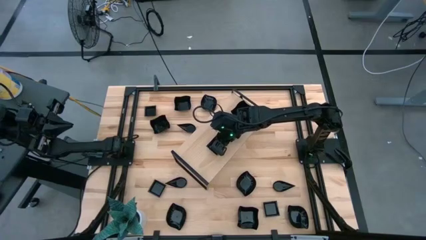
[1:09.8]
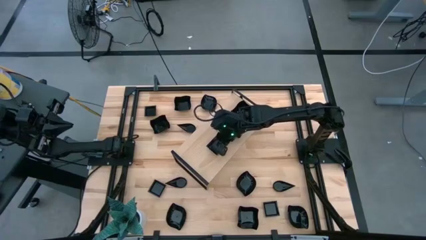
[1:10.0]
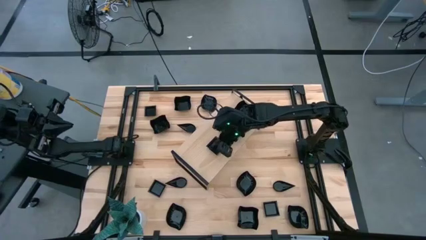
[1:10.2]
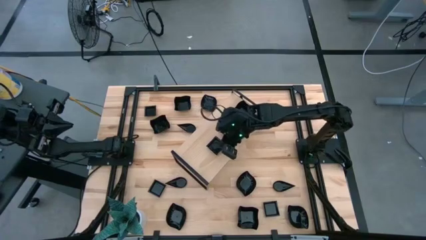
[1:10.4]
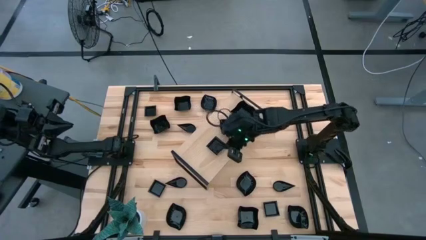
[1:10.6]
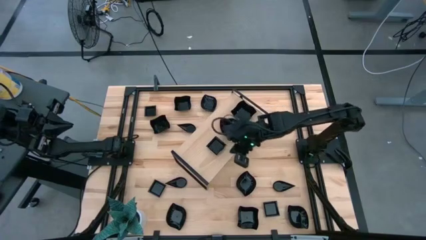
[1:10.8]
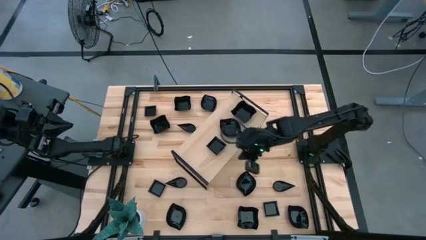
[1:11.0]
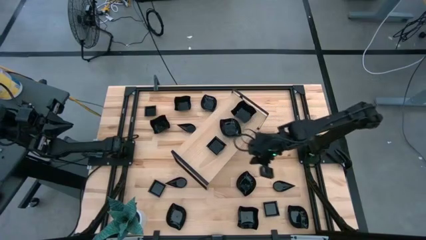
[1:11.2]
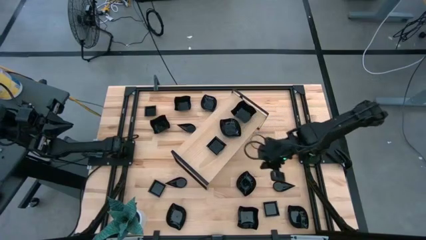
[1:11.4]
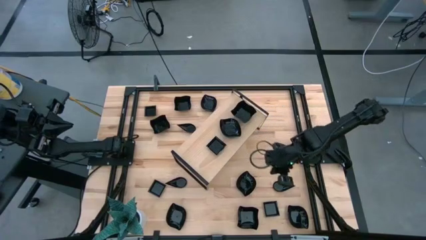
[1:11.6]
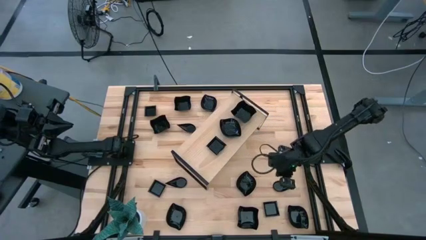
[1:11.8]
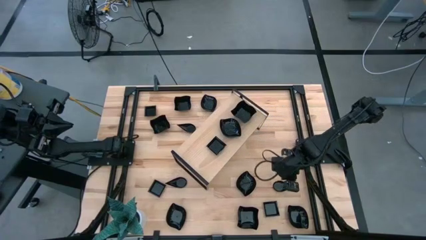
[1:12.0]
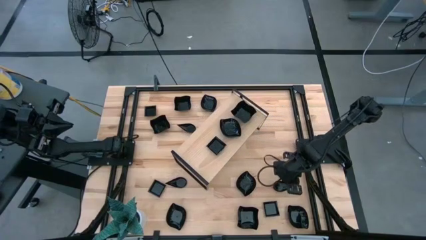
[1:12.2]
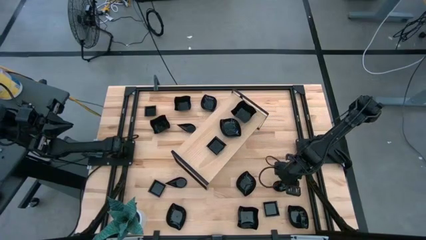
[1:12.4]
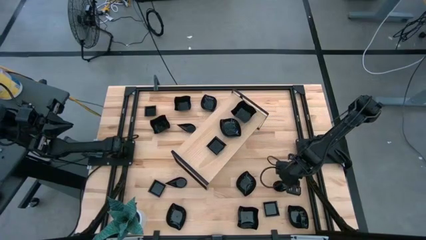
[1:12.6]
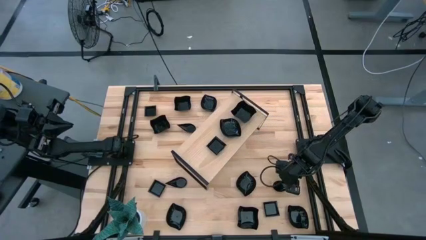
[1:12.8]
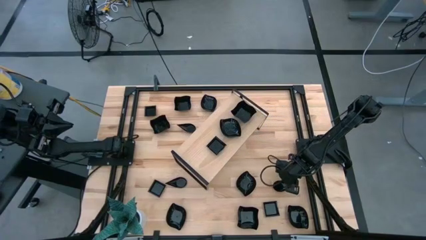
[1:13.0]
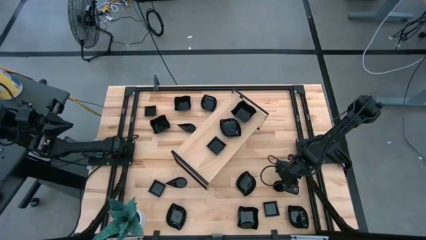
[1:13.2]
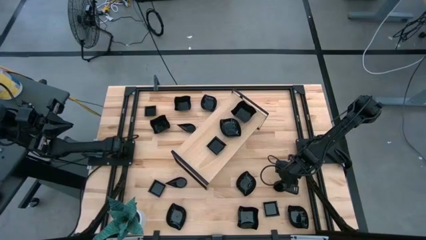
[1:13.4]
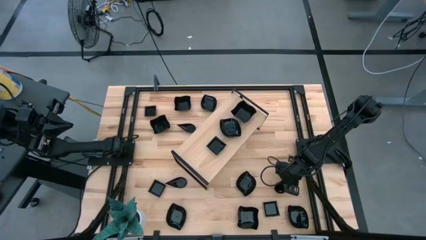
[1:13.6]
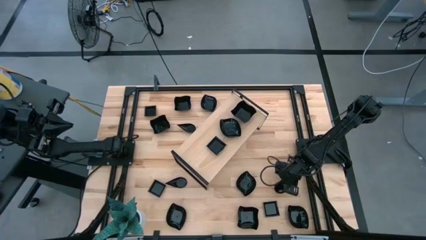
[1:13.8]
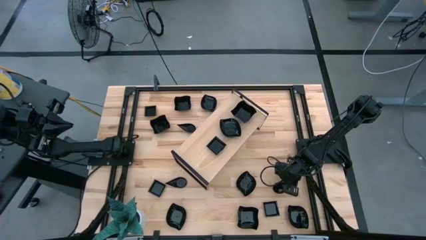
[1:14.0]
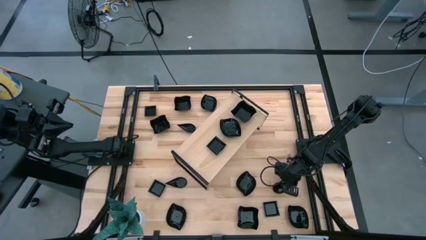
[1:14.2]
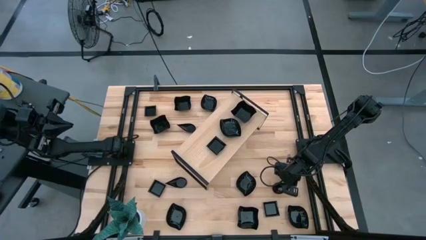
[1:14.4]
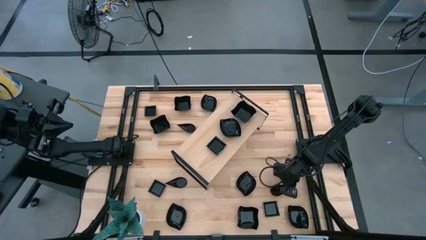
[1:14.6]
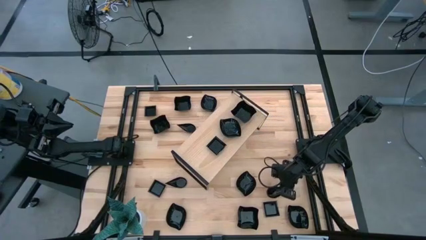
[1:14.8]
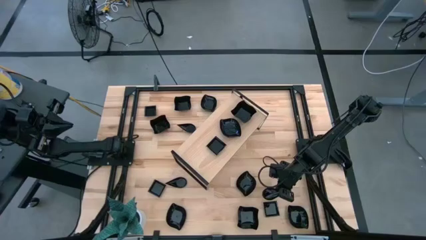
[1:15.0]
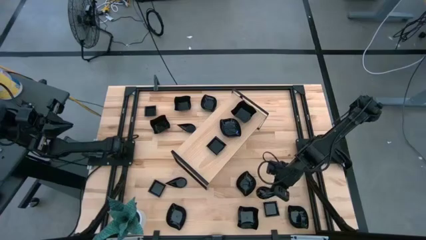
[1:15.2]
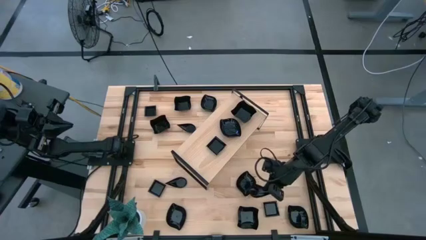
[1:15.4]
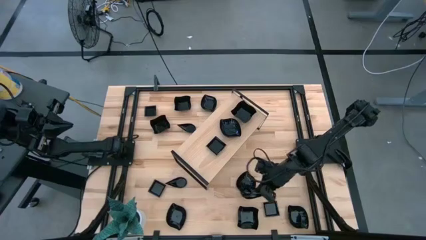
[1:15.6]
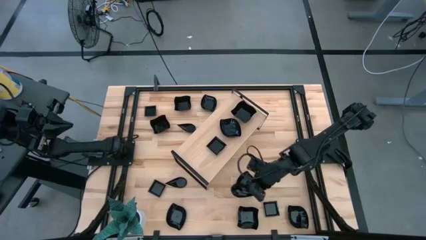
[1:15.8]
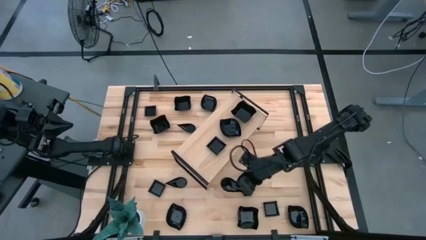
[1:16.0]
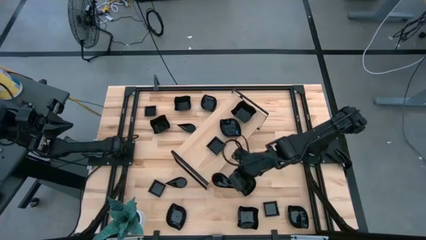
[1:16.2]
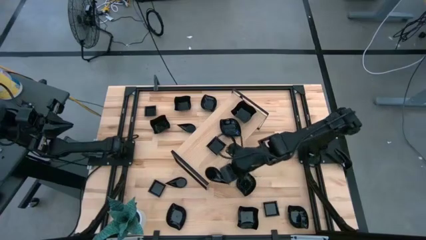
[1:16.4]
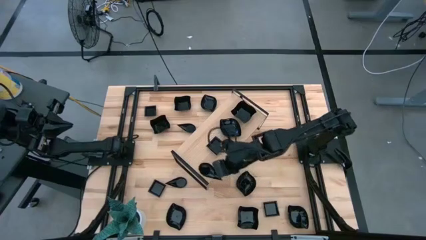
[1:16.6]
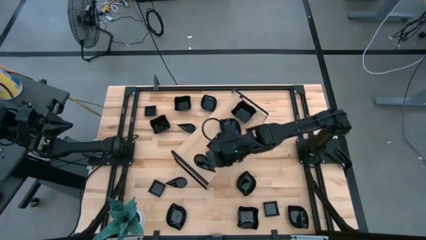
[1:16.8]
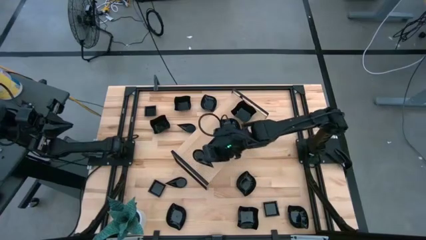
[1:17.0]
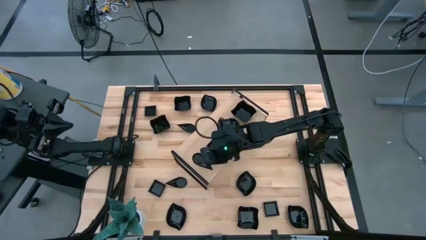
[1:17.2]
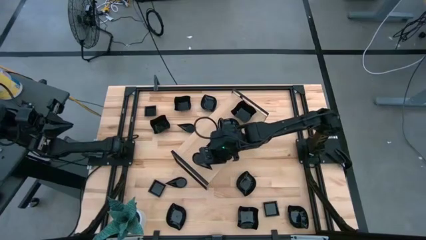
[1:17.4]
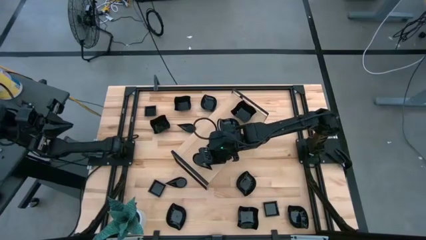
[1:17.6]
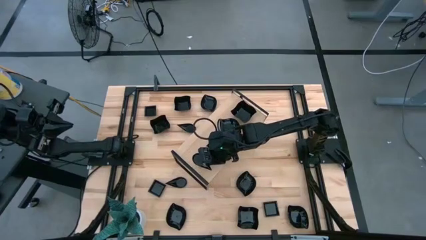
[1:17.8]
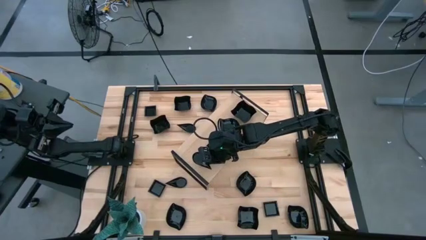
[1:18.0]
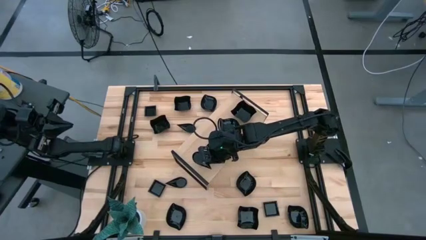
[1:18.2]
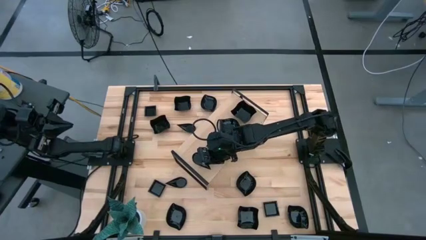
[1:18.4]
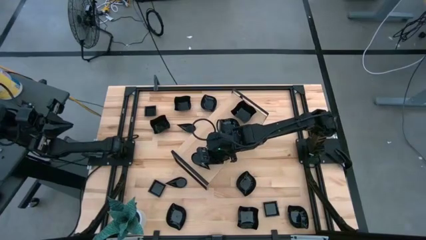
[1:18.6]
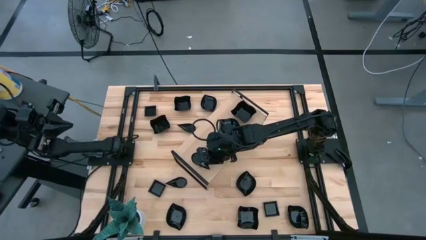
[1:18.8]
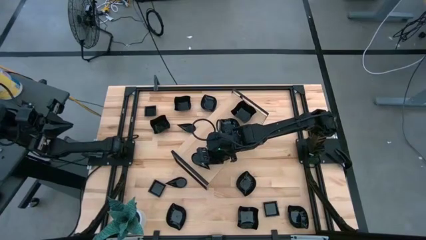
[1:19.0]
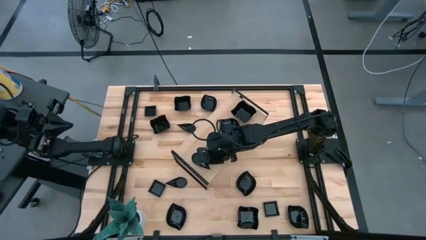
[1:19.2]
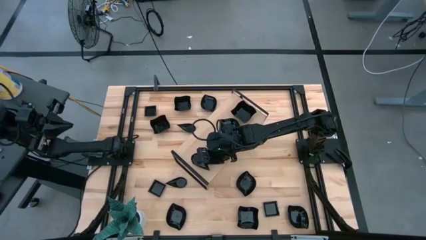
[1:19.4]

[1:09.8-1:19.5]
Task: Pick & Place Mini shaped plates
Put the black teardrop shaped plate on the shelf
